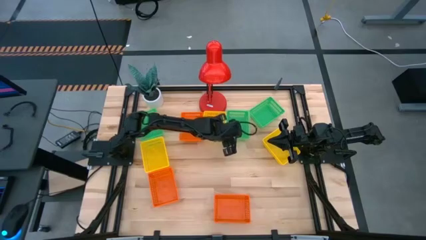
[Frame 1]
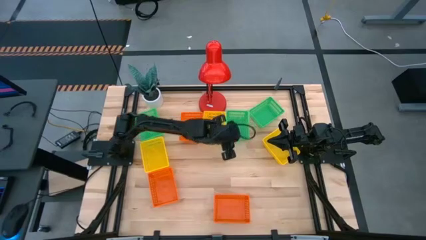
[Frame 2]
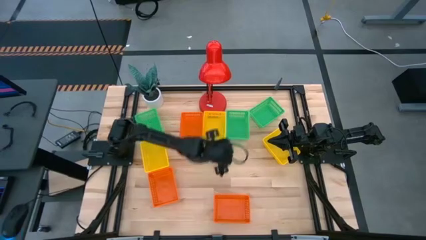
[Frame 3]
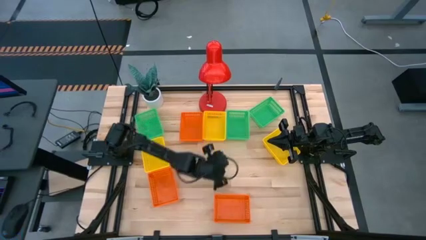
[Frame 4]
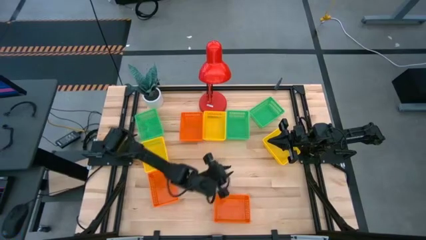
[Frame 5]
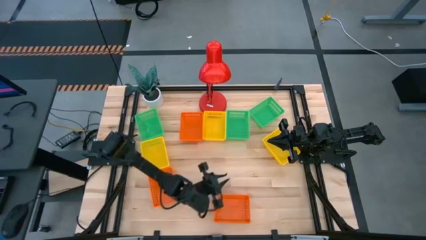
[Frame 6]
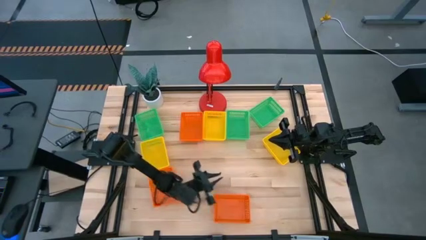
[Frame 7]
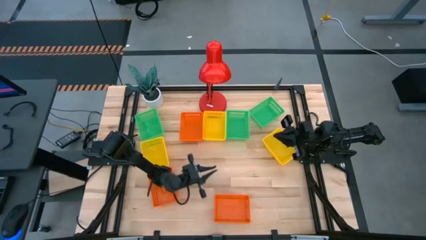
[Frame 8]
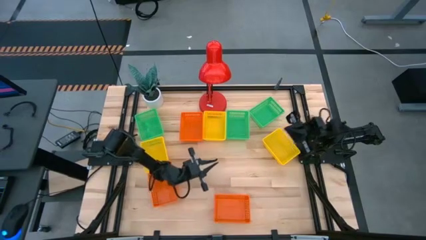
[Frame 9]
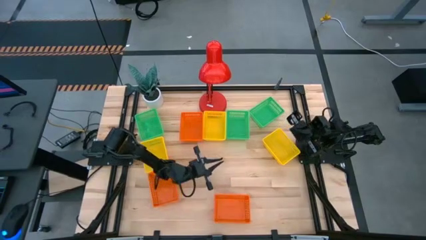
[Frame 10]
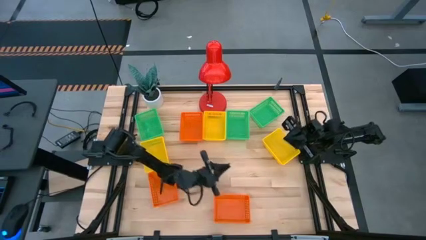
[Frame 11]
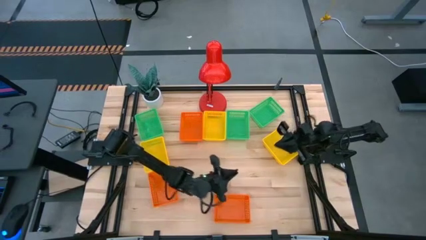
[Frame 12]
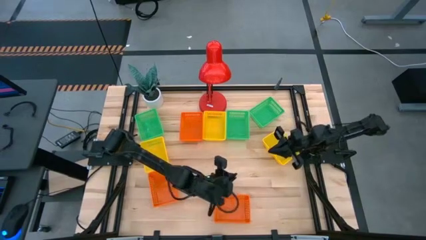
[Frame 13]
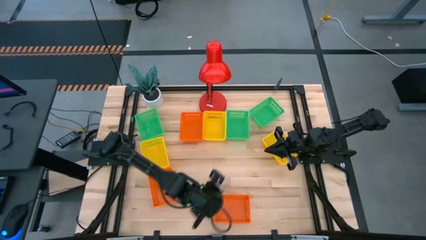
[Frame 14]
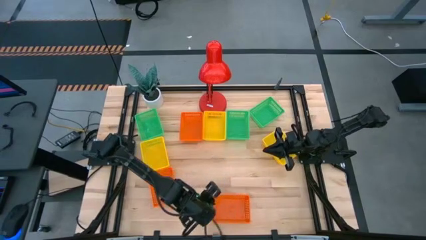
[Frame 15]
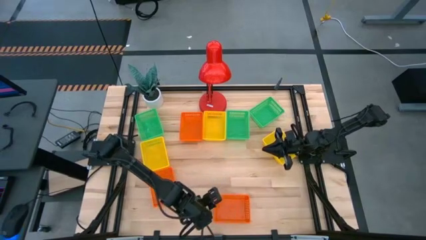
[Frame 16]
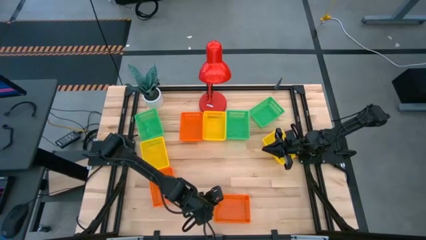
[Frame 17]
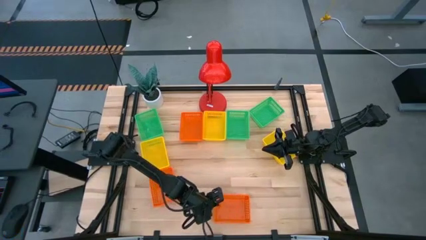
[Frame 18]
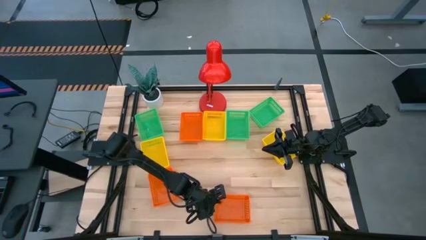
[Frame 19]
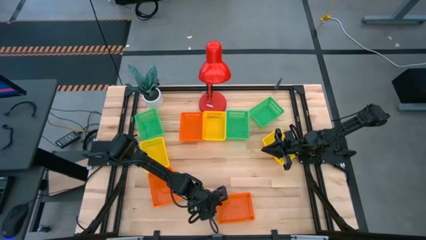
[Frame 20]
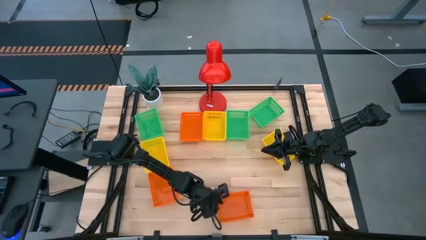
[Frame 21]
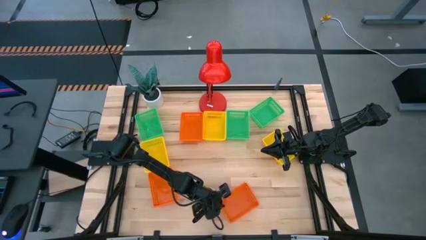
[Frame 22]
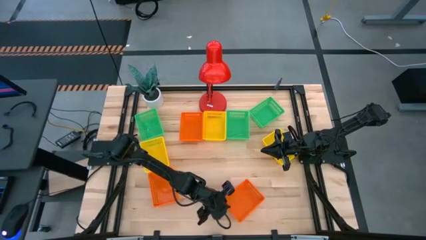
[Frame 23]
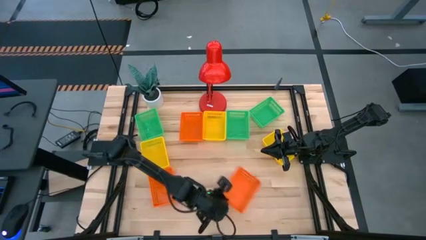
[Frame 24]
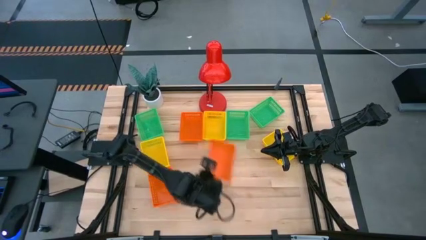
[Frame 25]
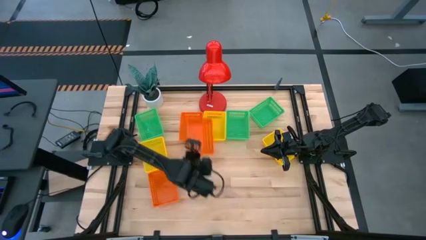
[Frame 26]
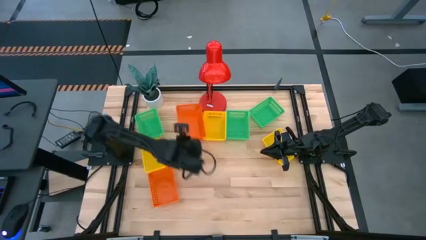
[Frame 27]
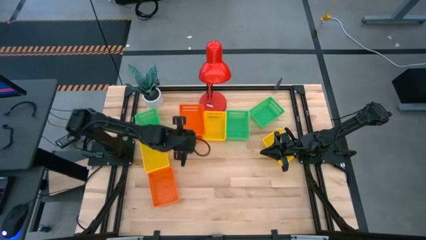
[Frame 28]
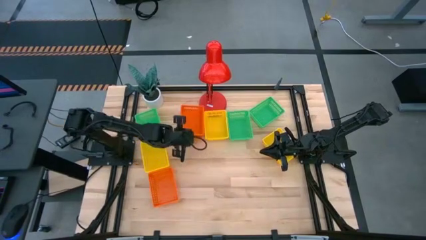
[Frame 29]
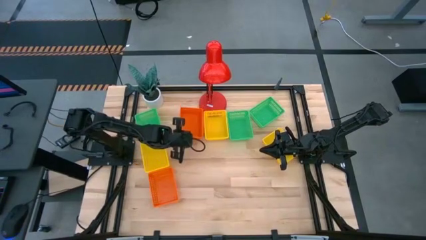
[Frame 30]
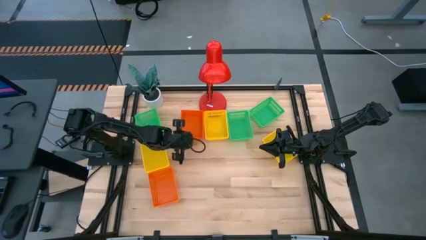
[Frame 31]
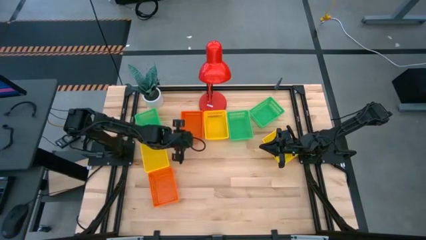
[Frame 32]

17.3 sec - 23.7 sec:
Stack the bottom right orange bin on top of the top orange bin

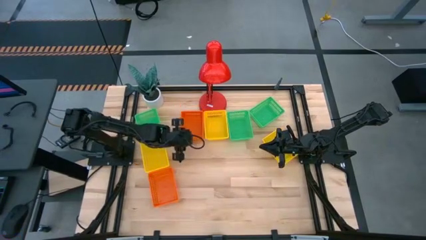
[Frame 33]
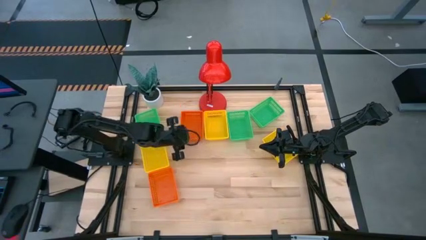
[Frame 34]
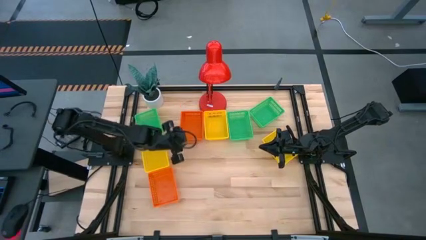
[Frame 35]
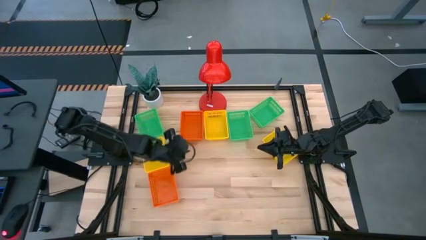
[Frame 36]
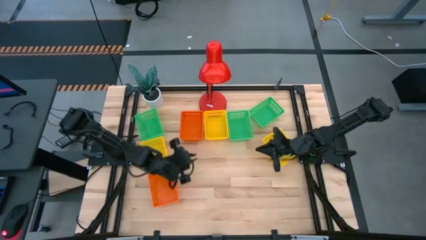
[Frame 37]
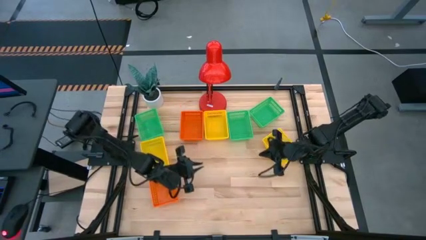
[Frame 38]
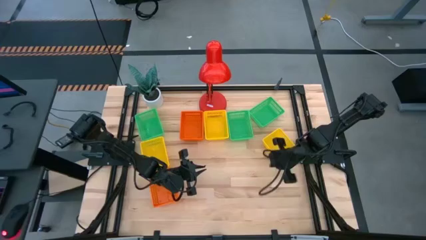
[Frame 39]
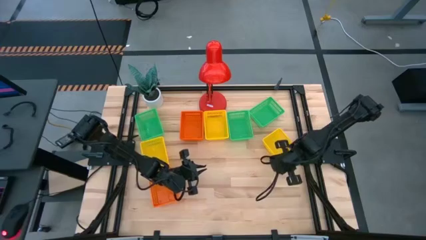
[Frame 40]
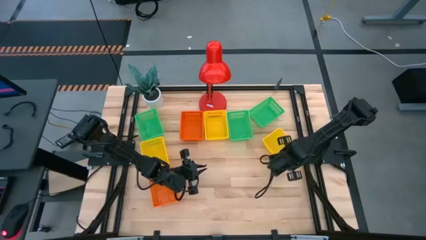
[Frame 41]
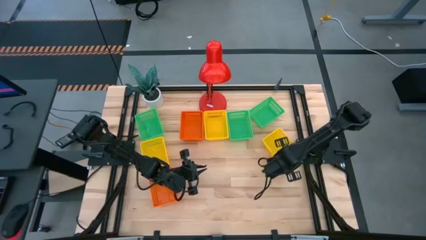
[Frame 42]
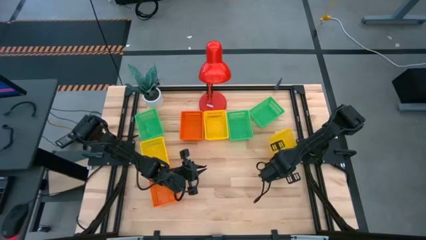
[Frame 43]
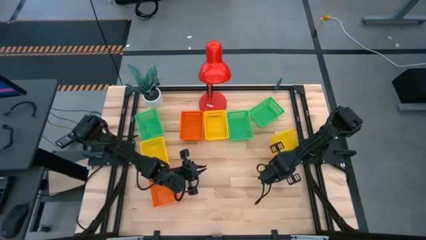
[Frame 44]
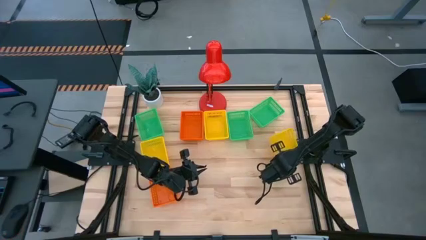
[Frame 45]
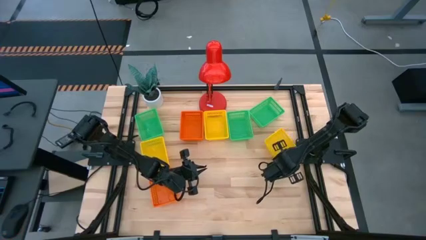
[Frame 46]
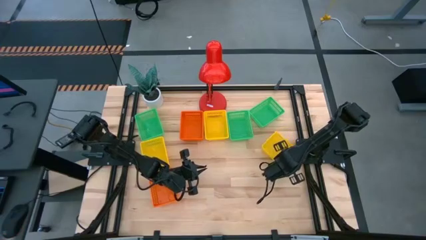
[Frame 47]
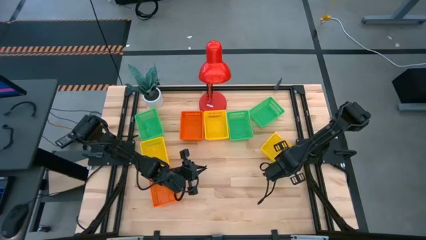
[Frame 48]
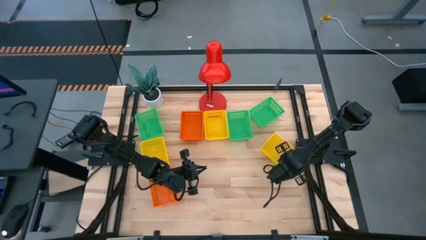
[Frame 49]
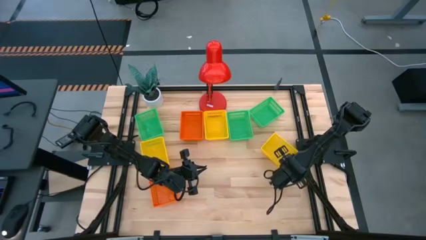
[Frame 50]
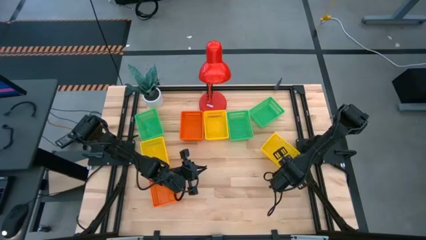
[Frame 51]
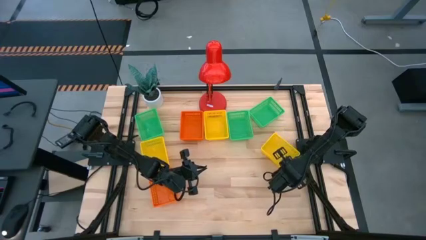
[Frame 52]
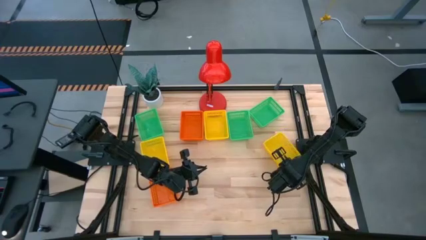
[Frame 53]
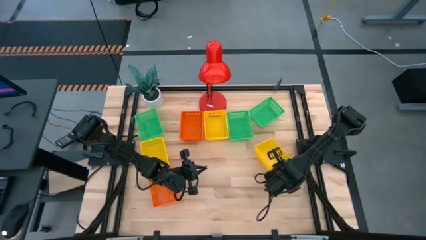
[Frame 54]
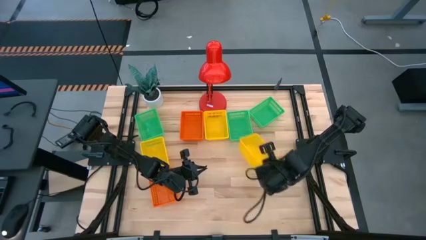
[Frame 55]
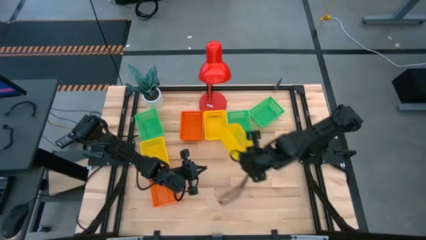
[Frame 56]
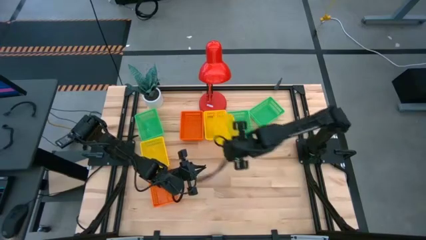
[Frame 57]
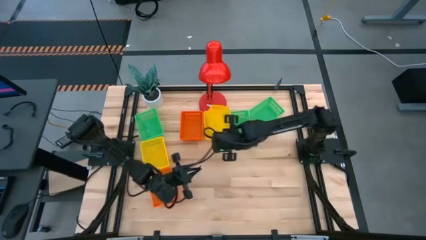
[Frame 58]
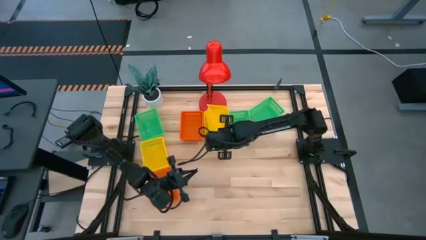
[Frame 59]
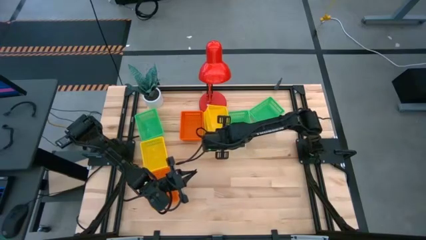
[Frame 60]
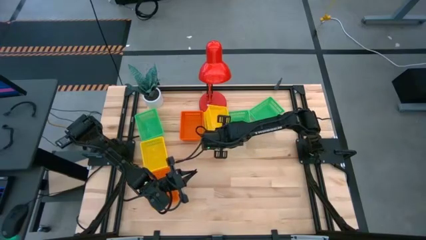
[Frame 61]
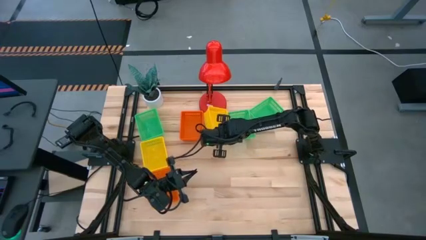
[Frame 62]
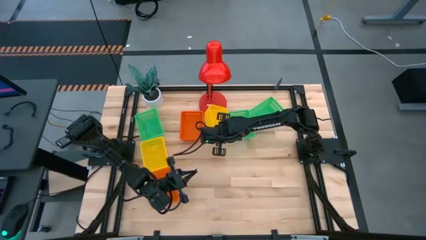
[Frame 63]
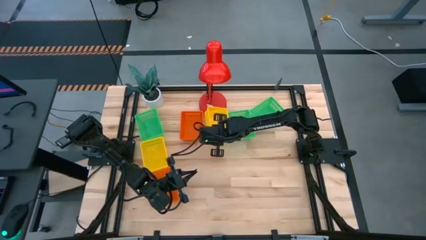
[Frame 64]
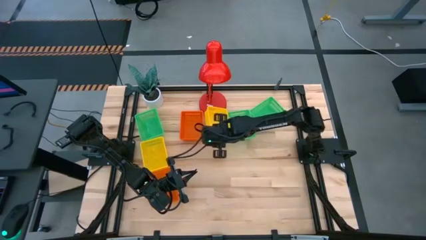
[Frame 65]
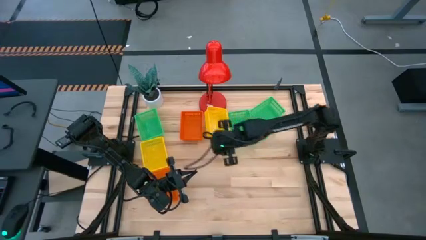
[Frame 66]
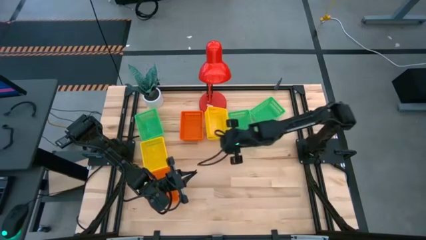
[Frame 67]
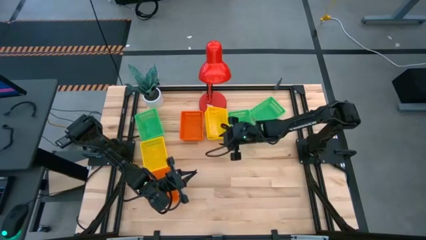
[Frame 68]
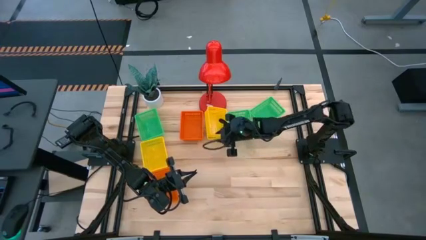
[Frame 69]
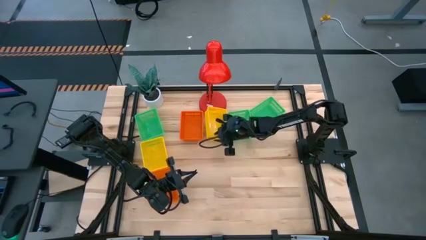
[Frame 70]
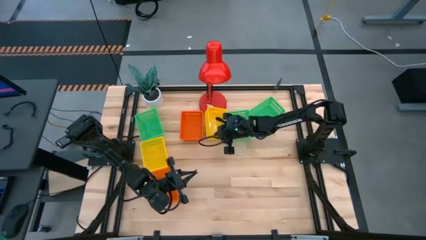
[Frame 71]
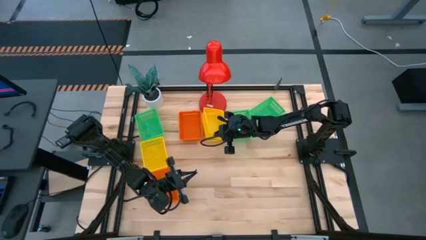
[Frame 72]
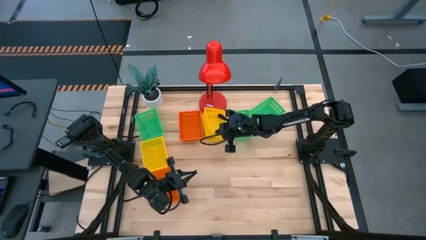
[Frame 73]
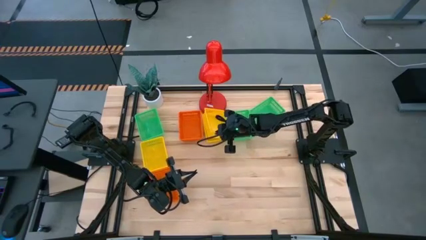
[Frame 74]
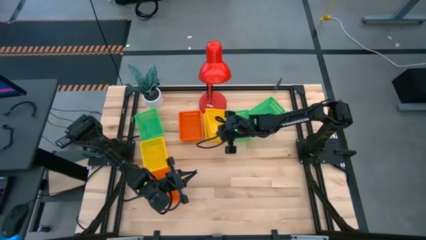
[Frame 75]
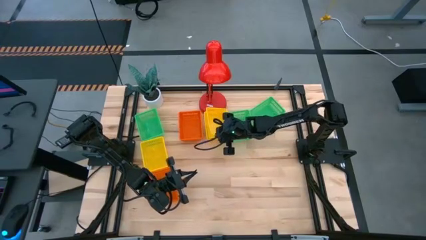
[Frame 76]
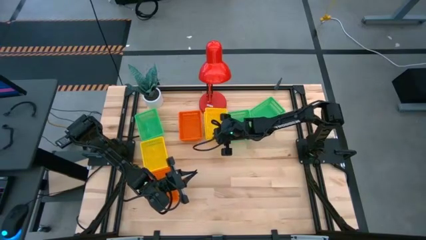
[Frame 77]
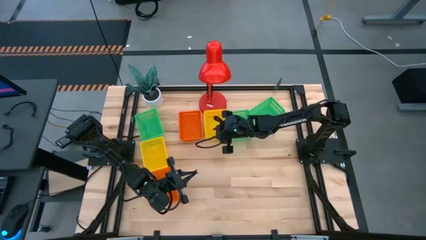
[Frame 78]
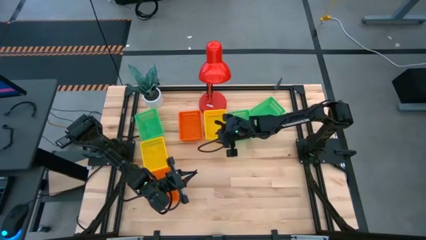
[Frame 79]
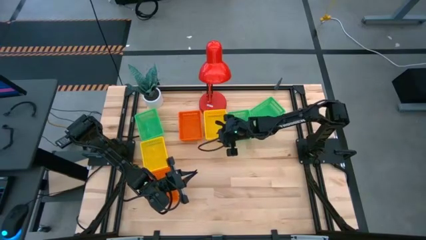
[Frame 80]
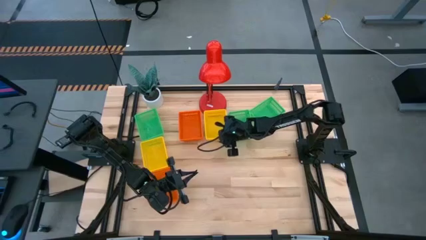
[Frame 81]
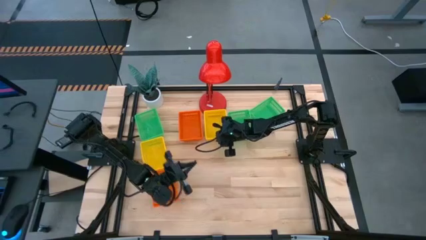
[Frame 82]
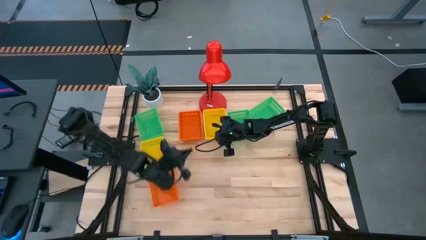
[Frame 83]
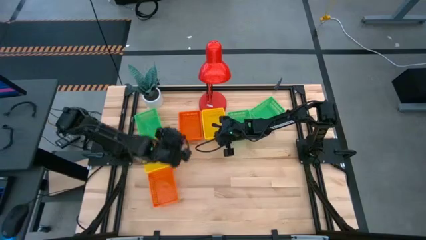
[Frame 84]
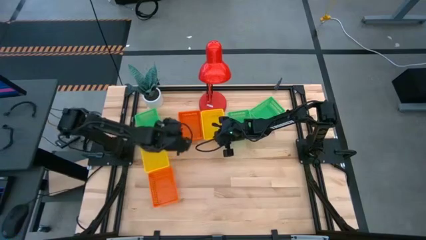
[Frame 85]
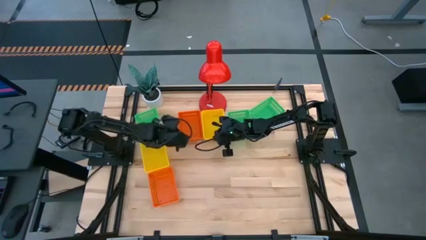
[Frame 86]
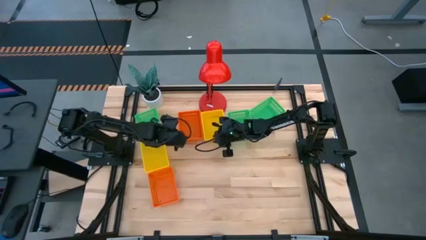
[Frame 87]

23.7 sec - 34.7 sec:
Stack the right yellow bin on top of the middle yellow bin
